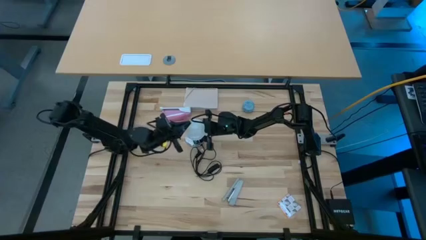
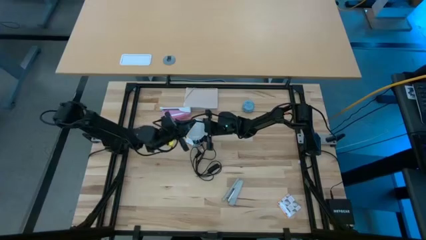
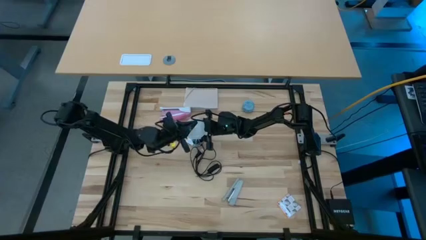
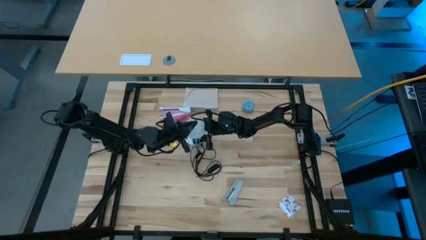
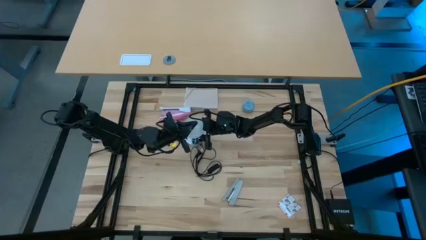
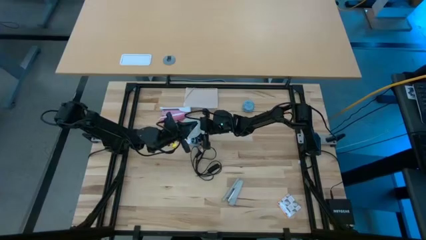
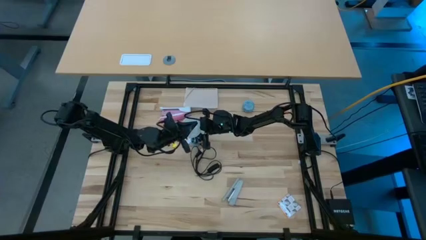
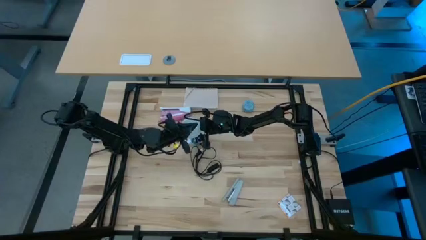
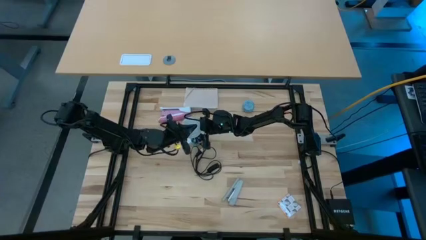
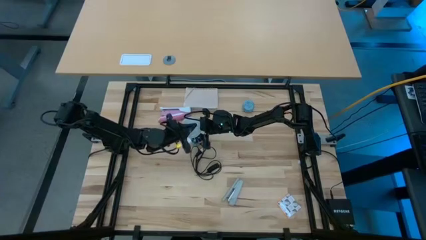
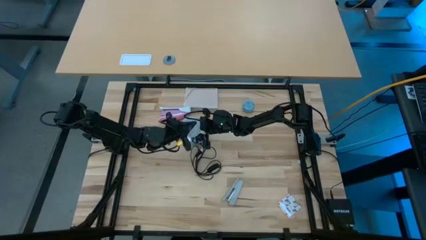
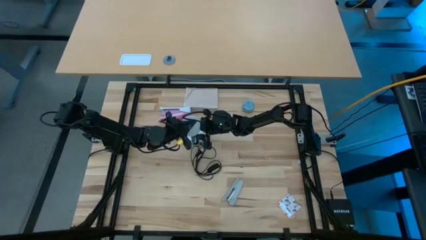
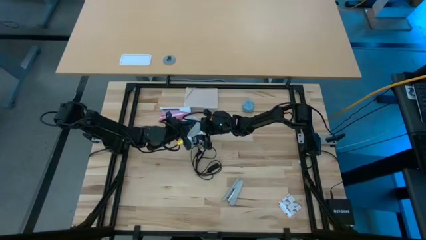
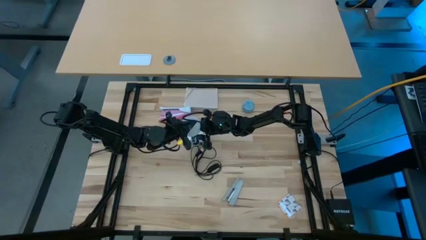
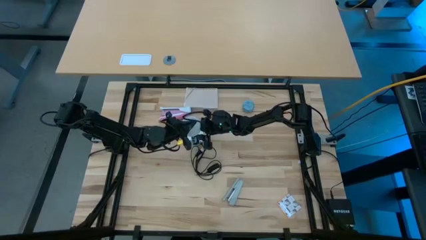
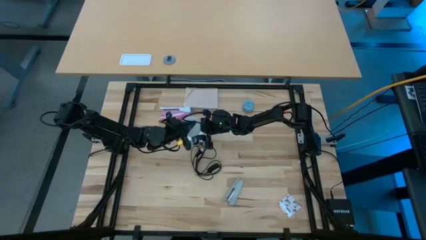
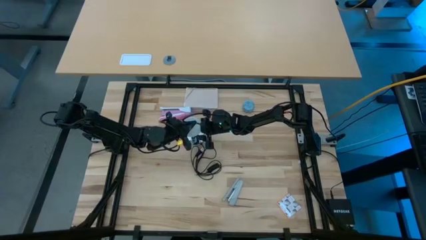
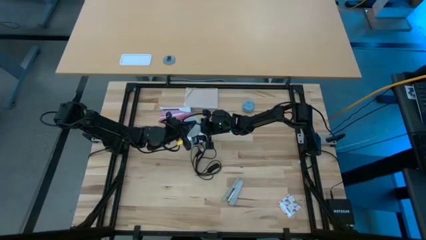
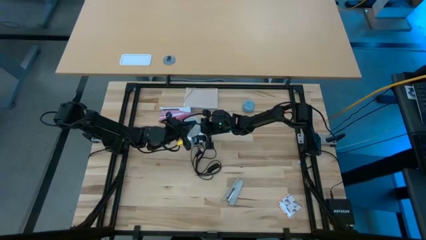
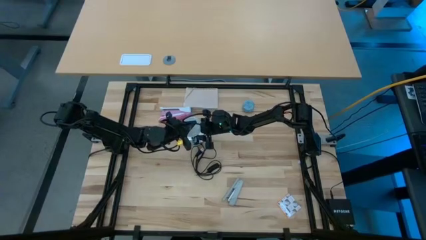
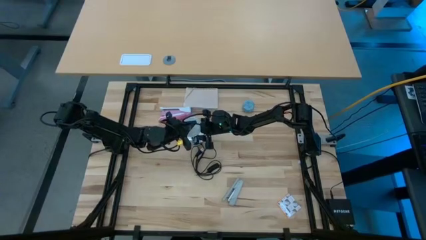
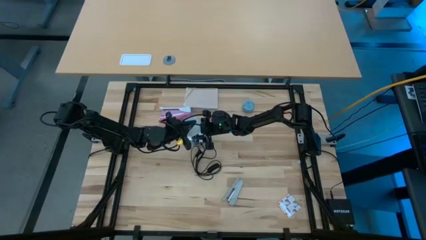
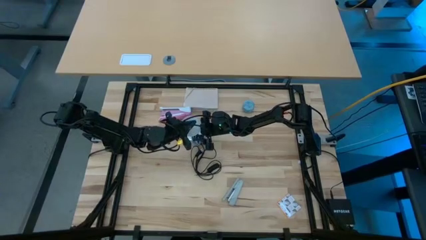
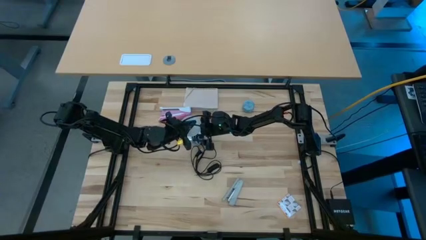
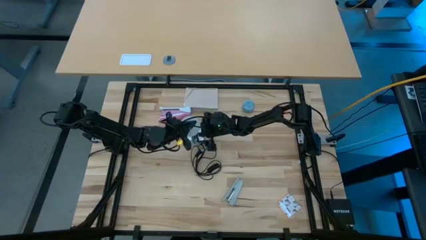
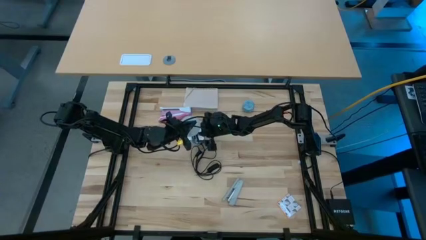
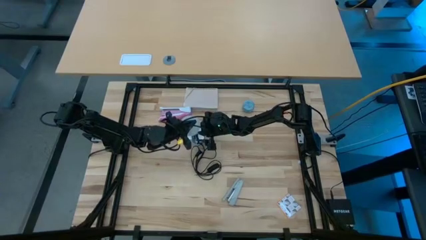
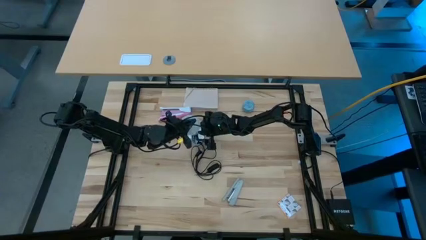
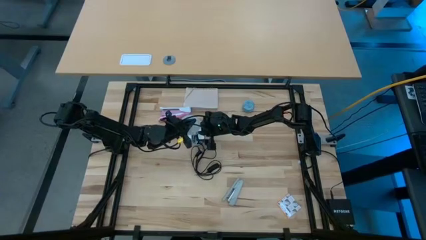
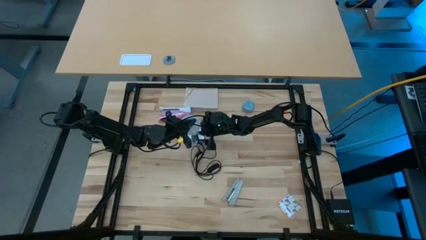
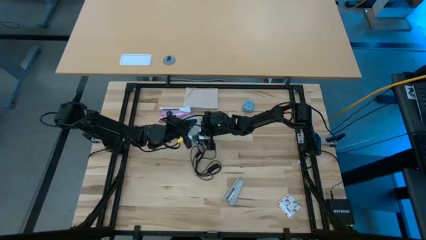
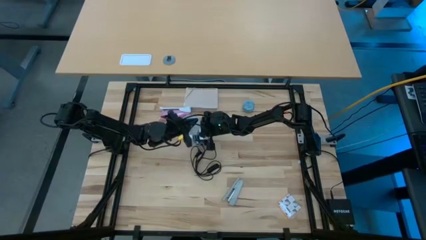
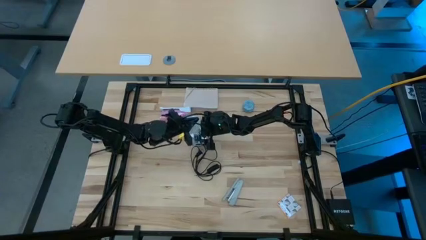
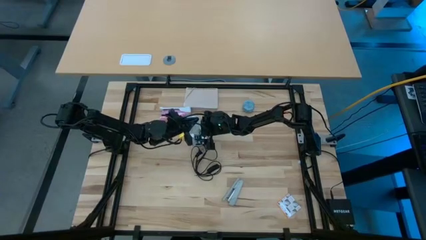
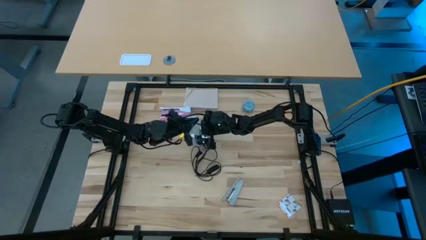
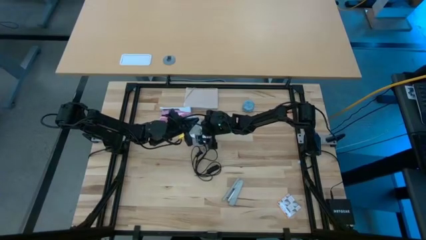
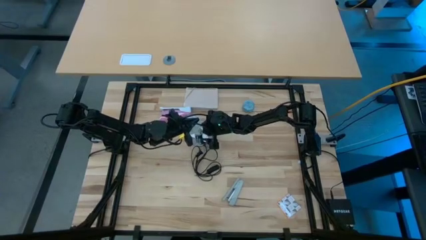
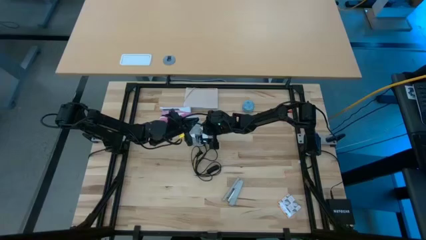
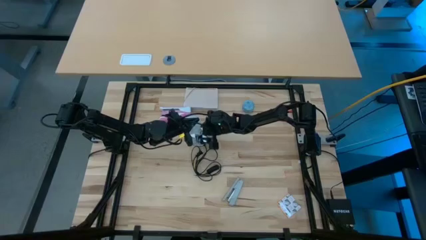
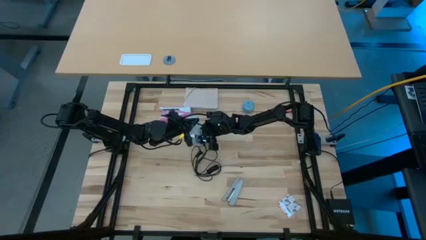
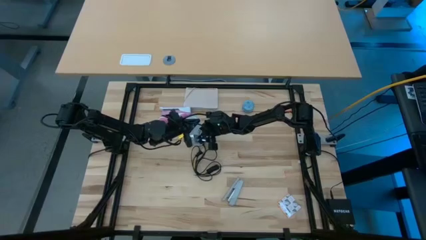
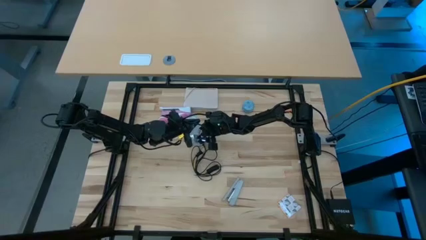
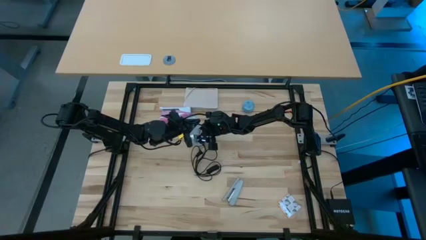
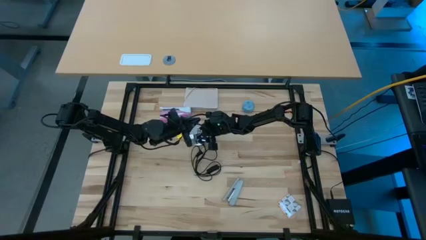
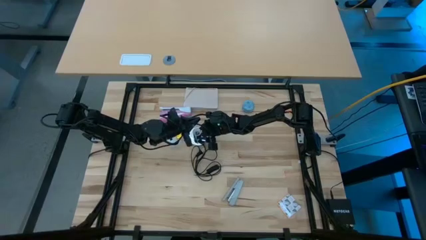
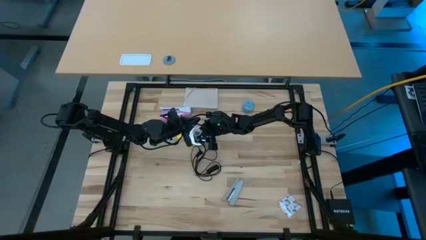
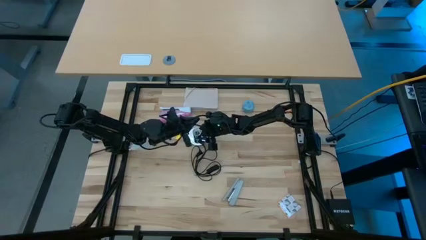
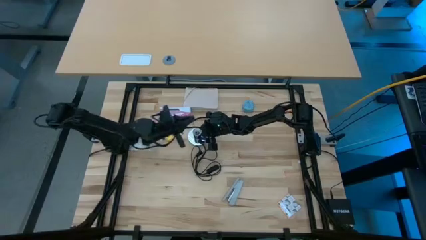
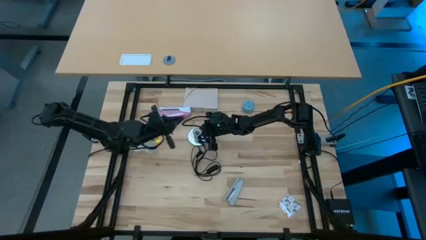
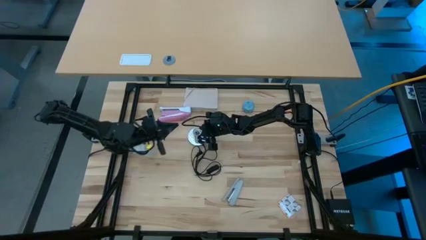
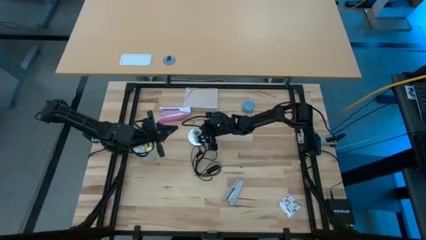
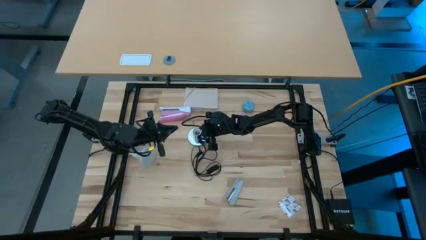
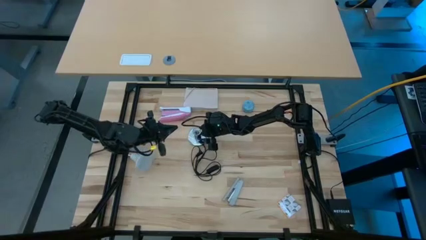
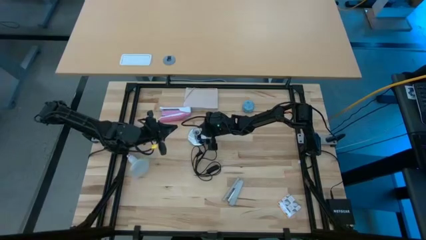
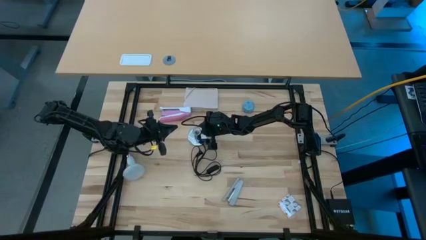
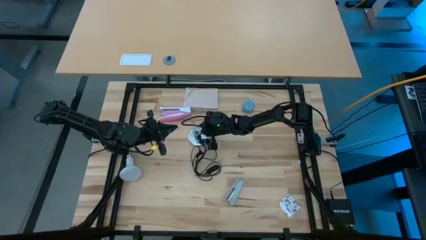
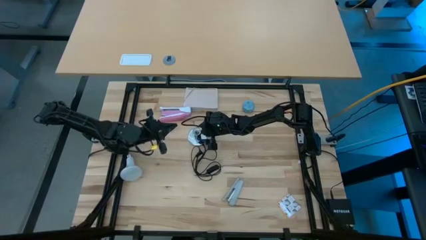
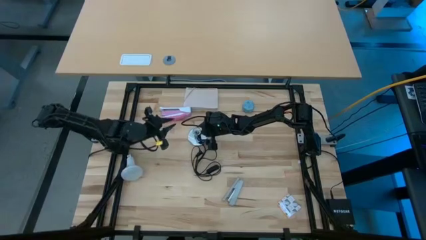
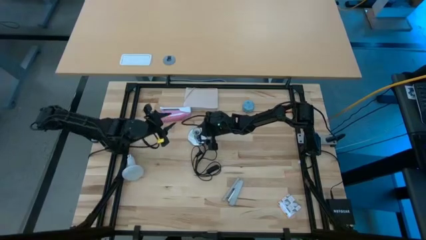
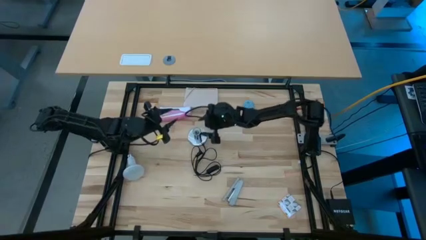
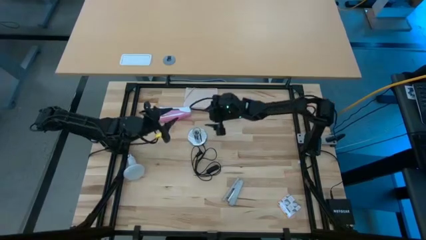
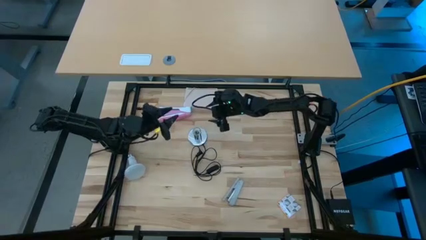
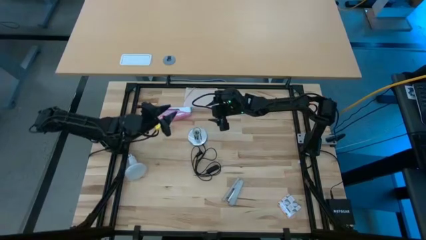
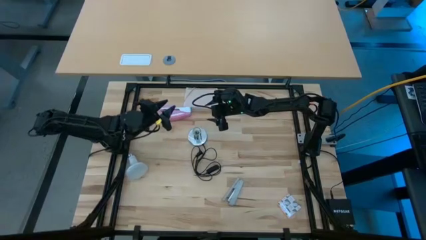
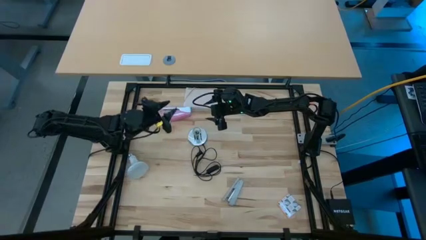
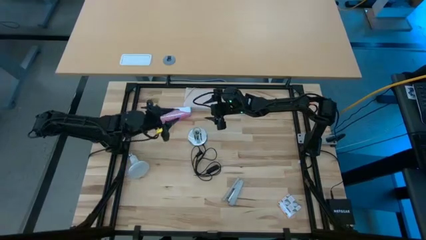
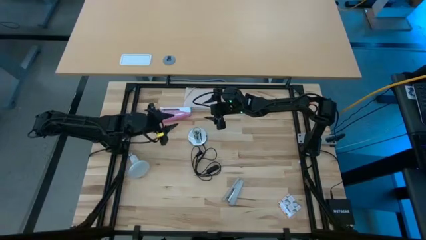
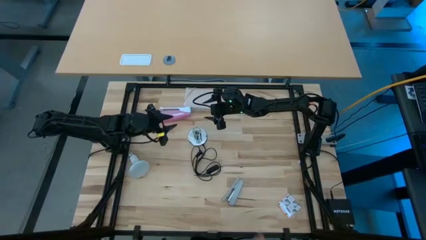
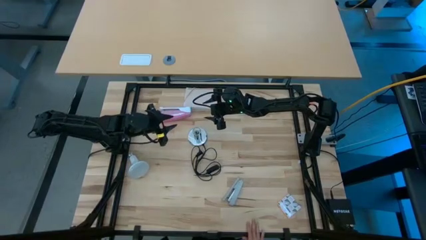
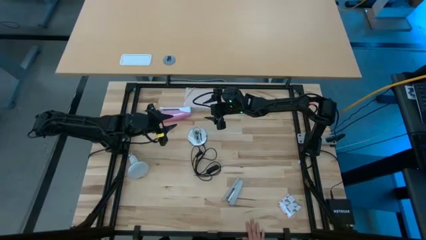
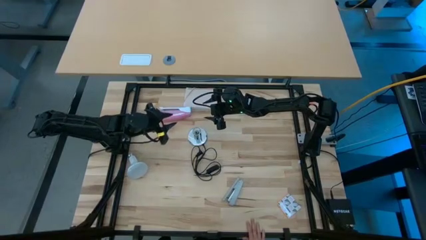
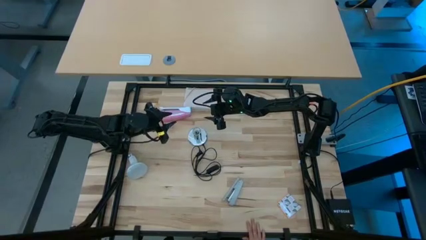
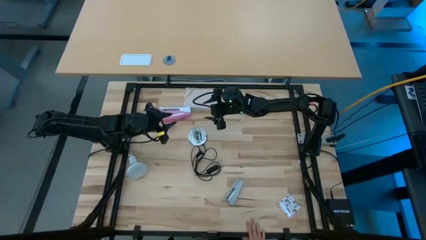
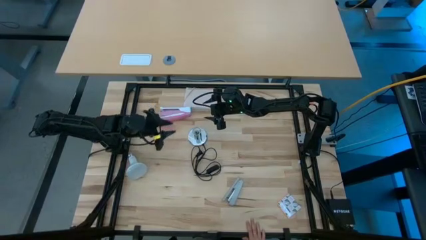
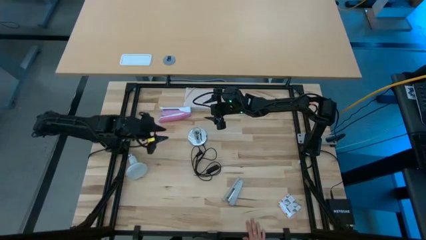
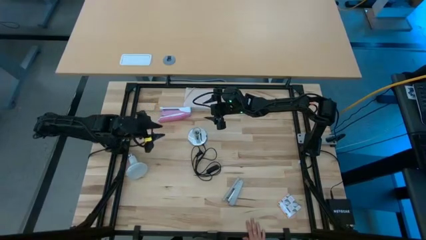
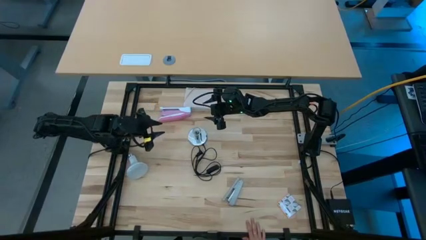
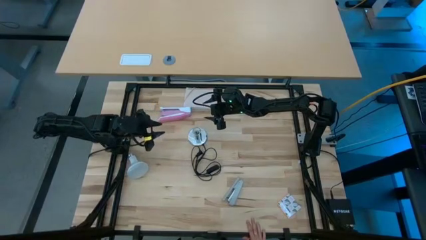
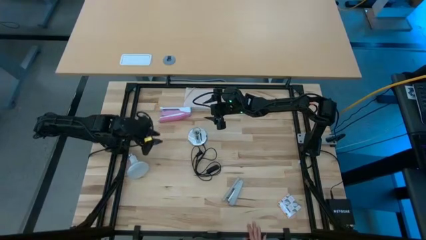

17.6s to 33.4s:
Task: Screw lightbulb
Insert light bulb into the lamp
